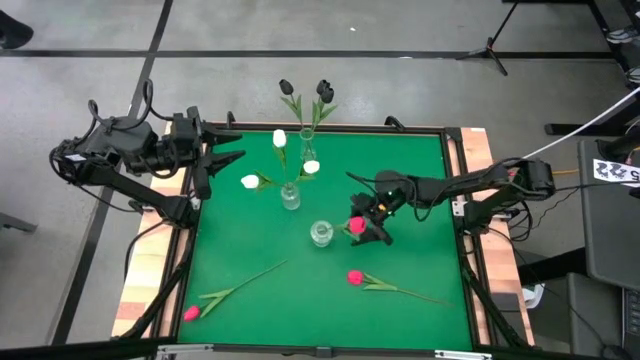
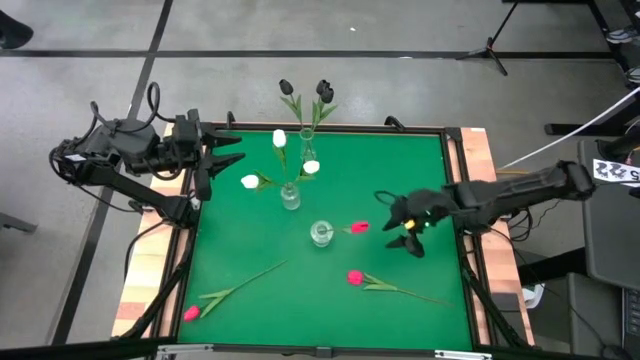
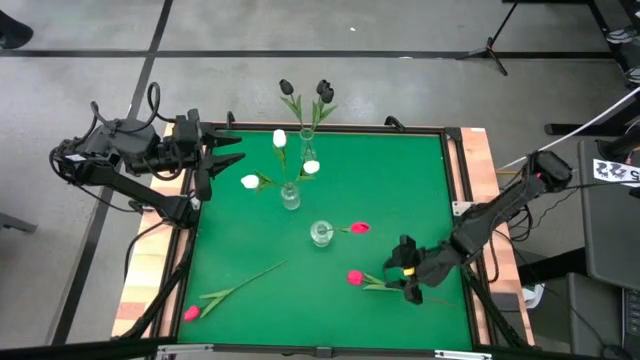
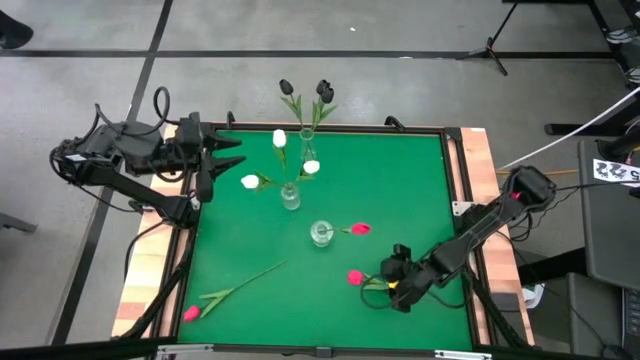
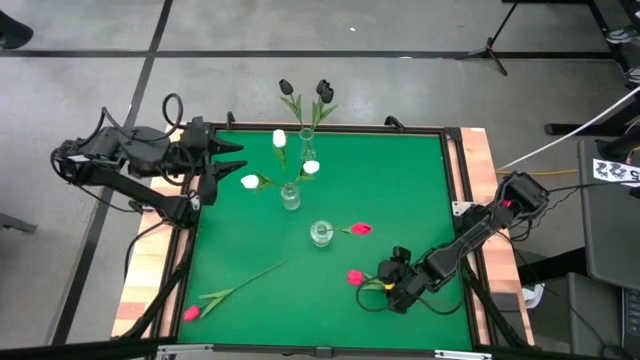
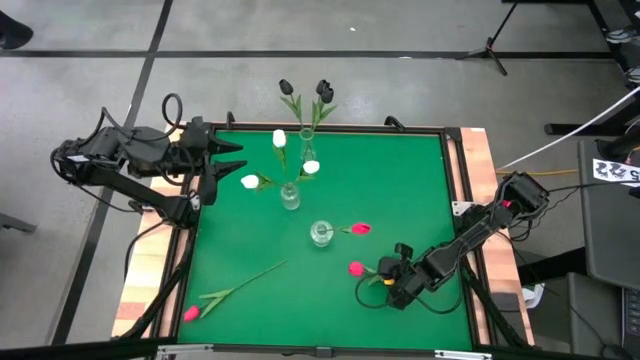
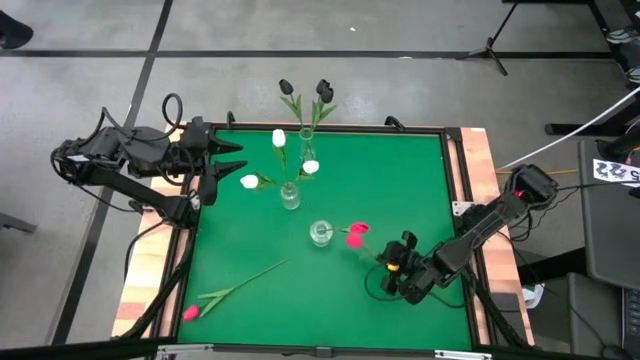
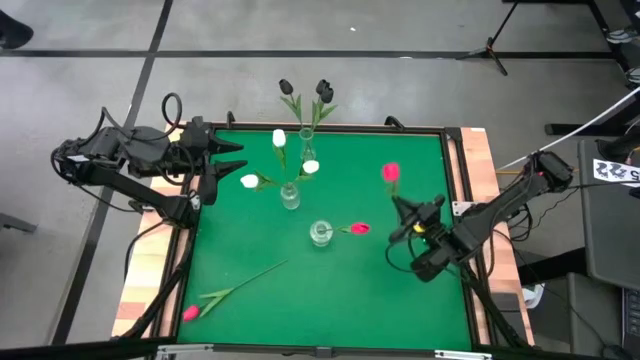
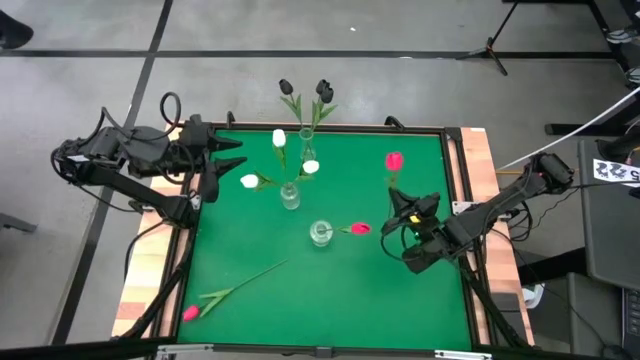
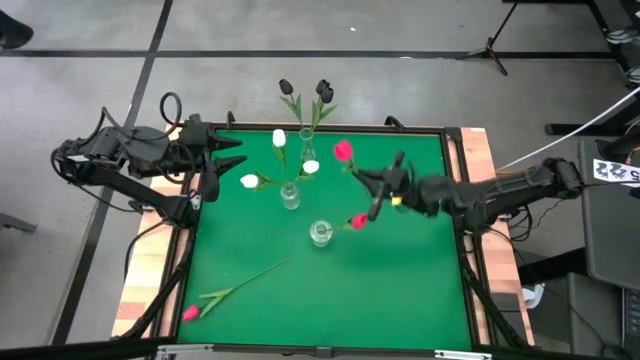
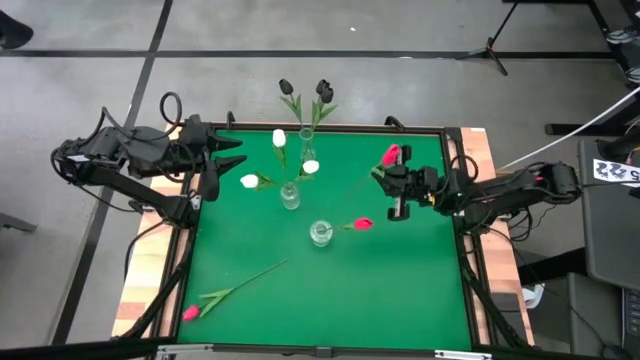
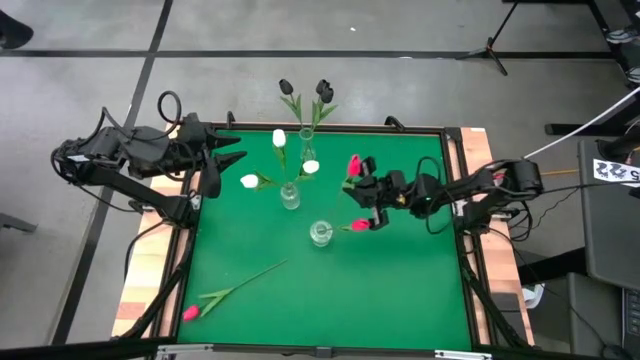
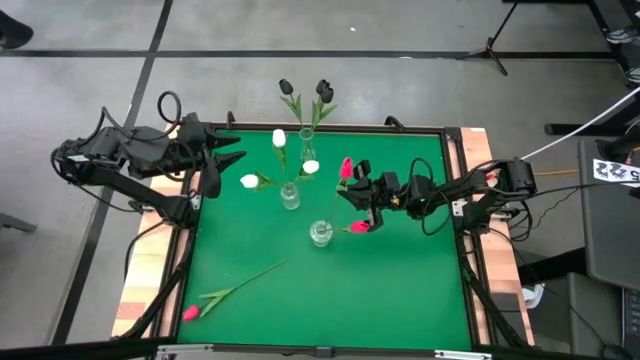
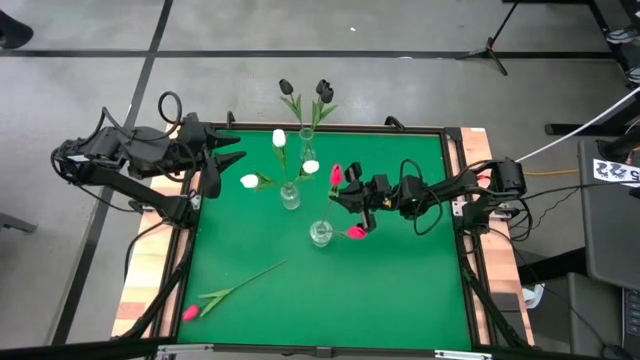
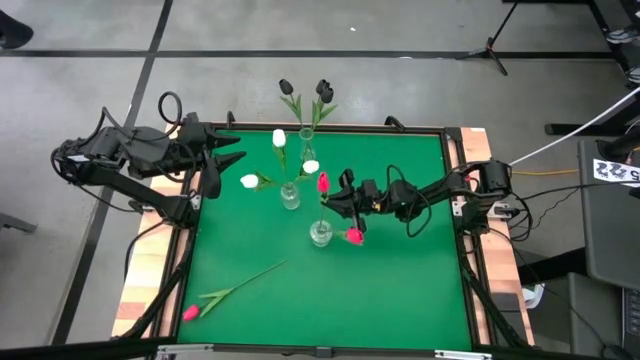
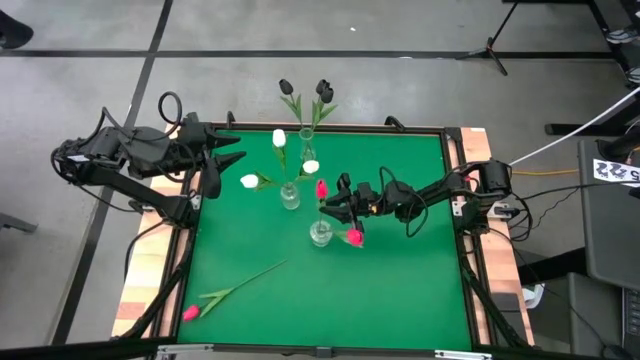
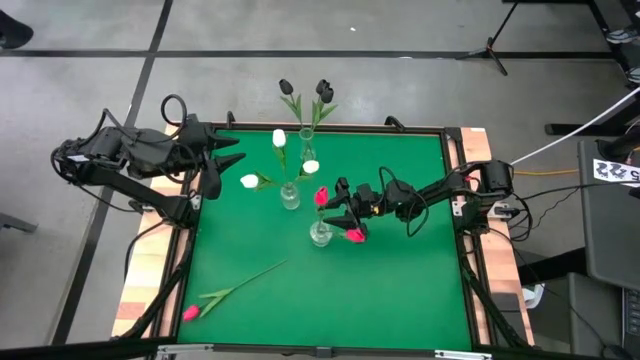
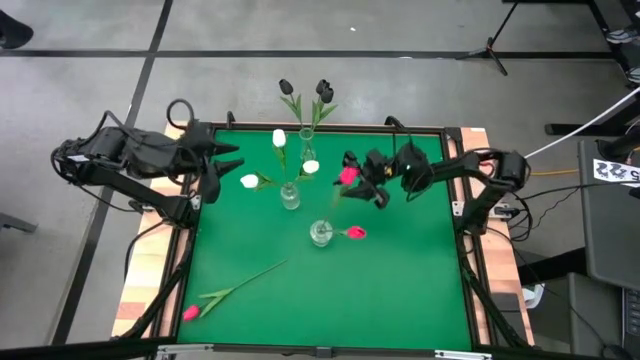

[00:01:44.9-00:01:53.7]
Task: Sort flowers into vase by color
Put the right pink flower into the bottom transparent vase

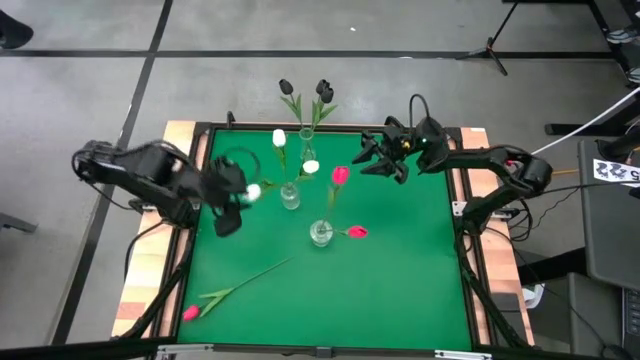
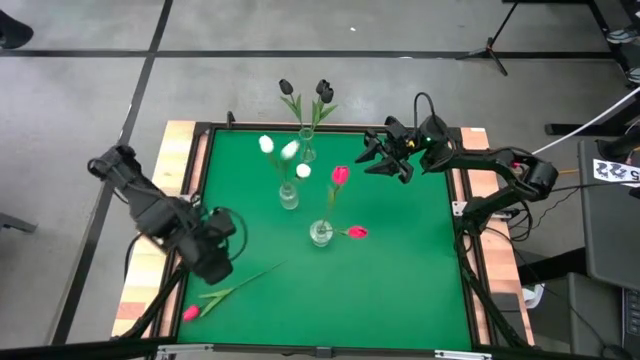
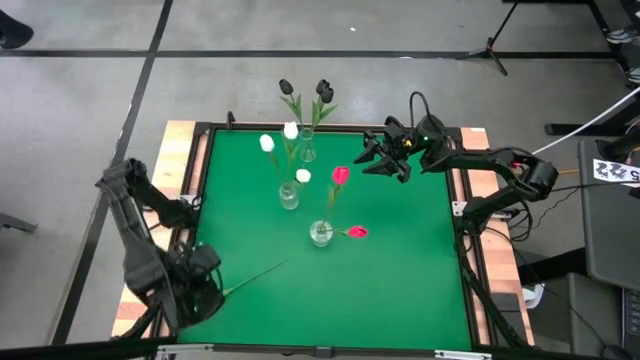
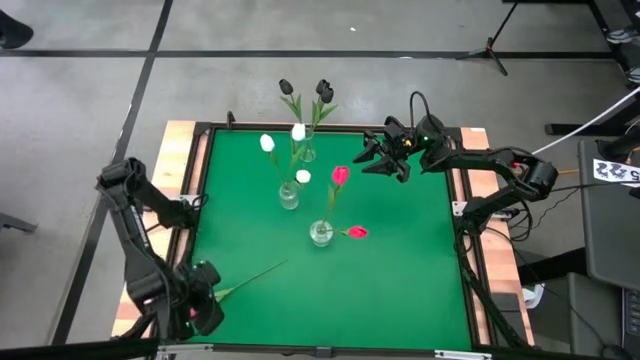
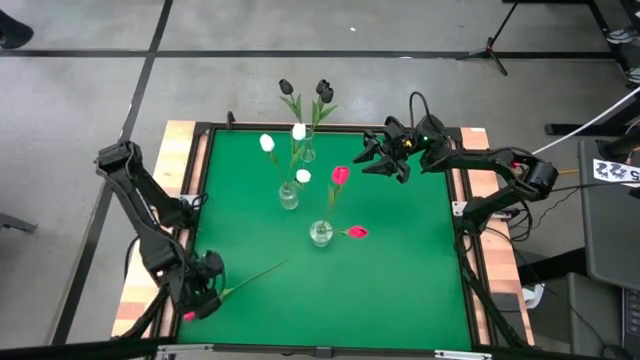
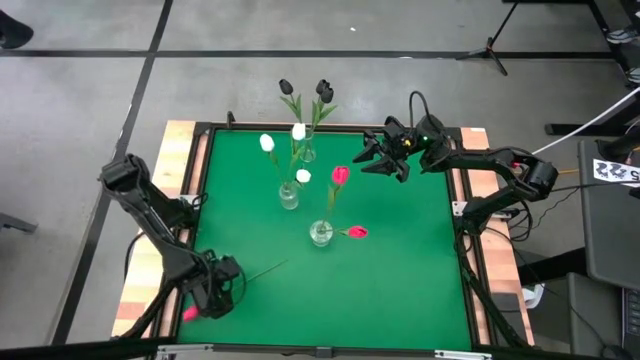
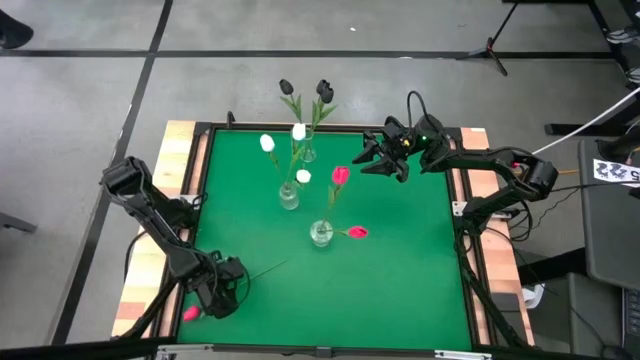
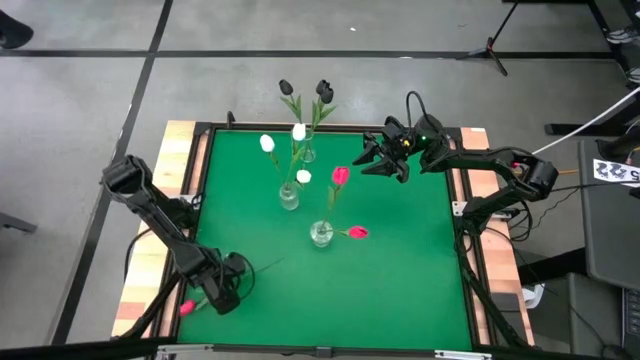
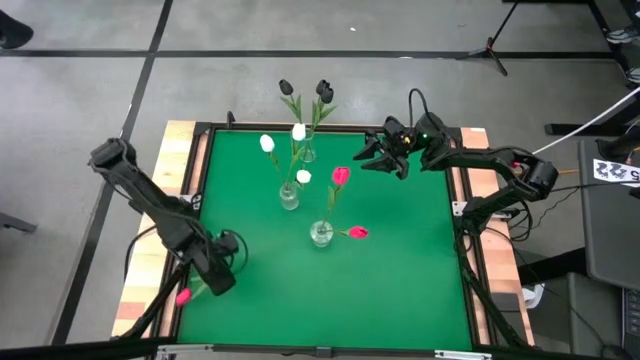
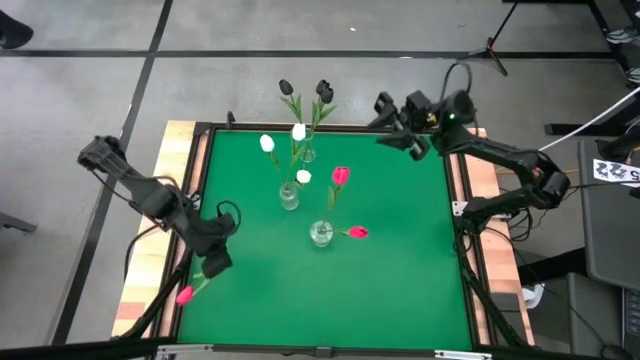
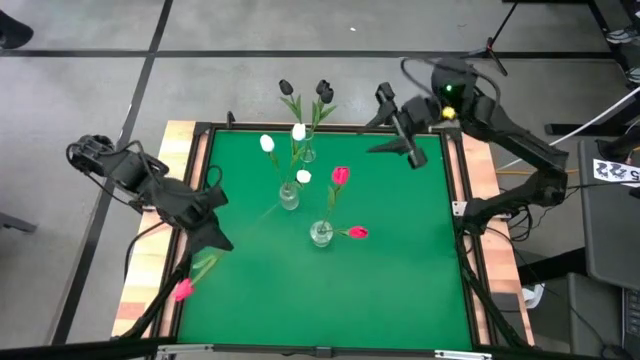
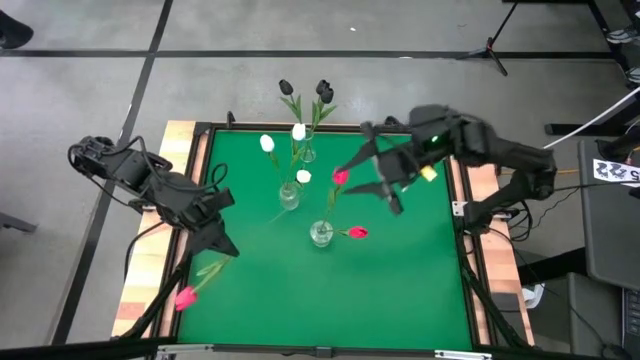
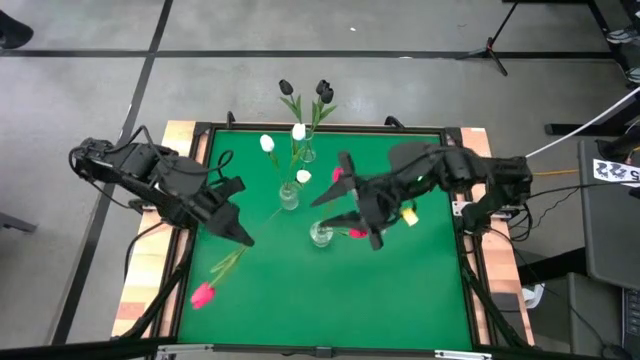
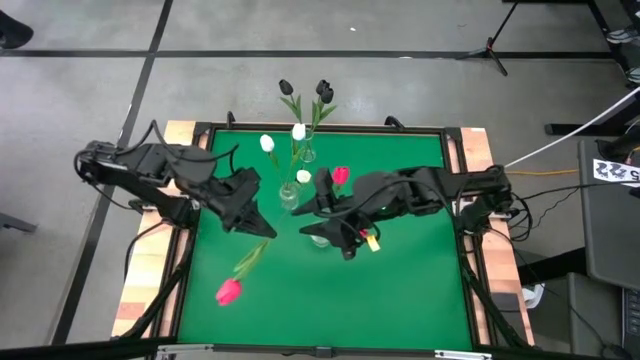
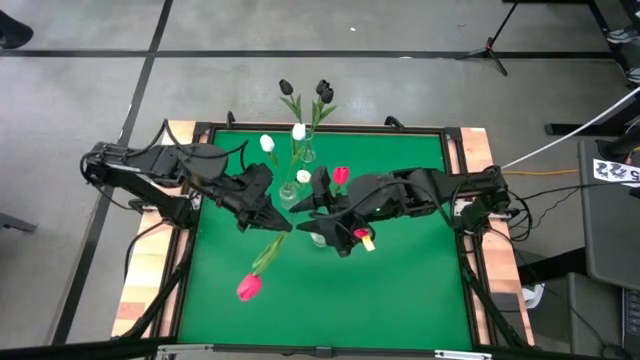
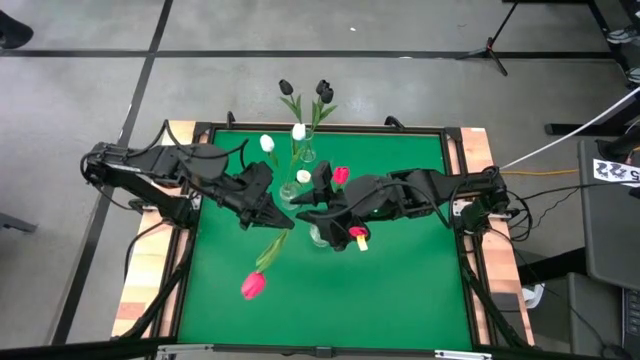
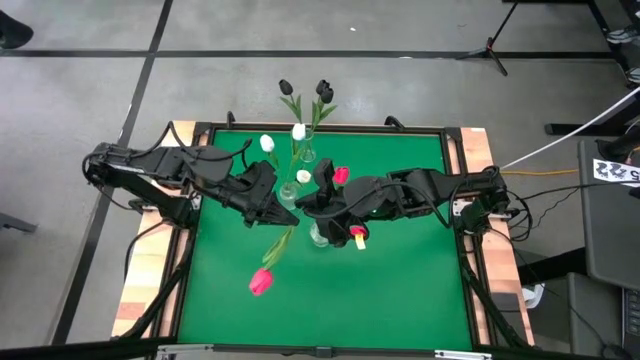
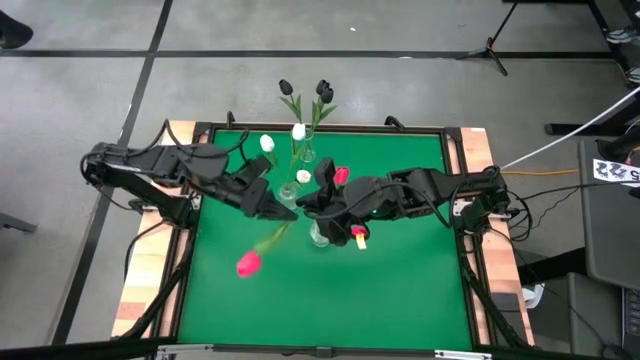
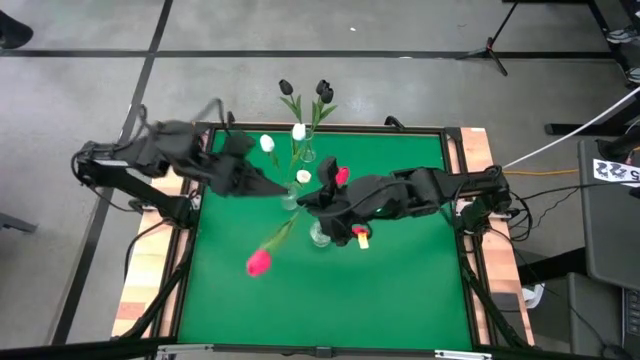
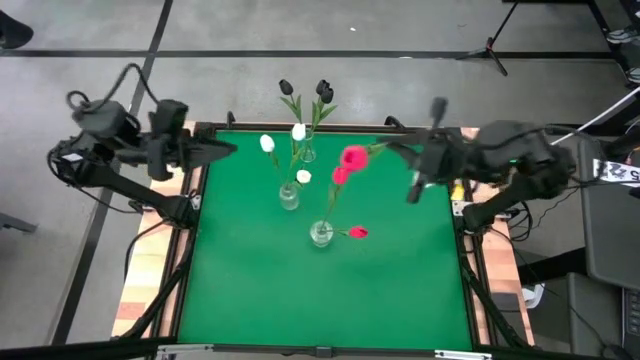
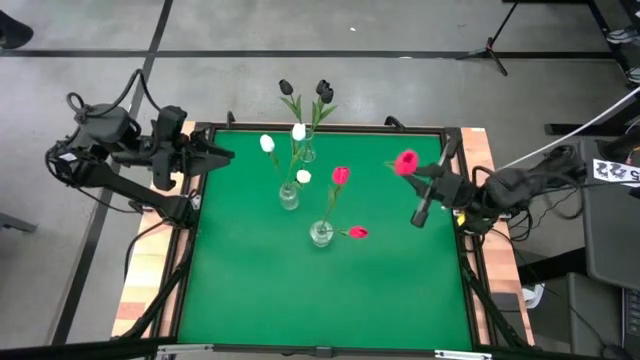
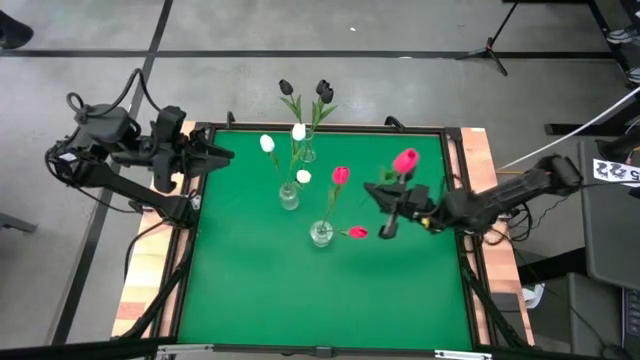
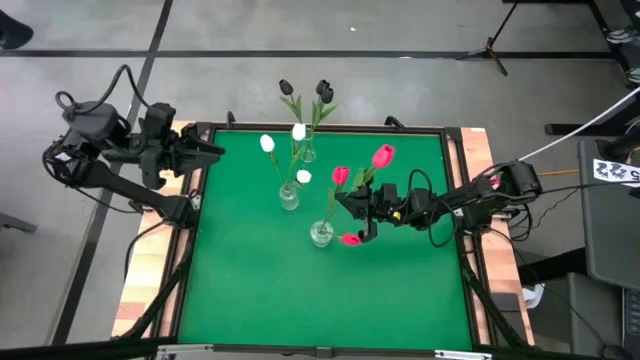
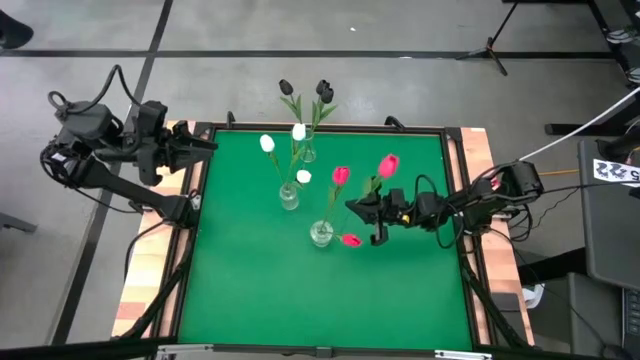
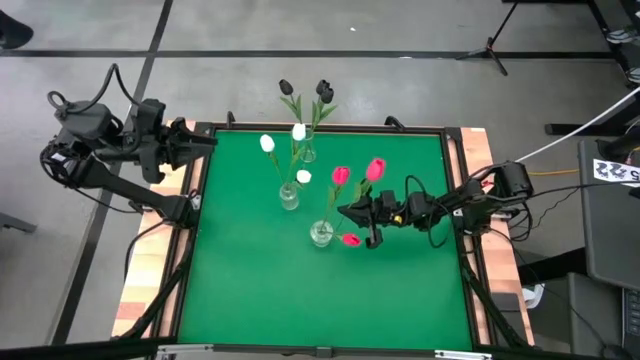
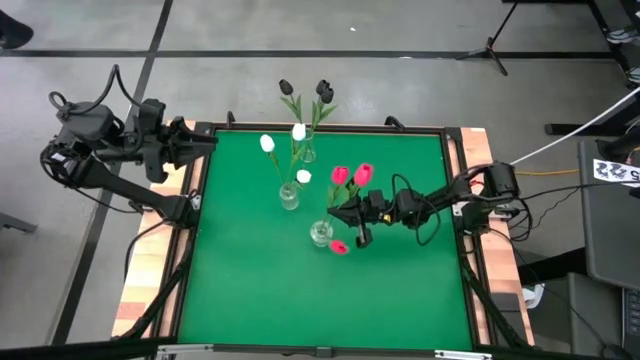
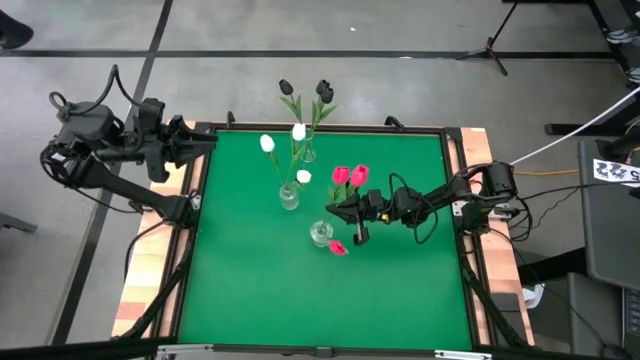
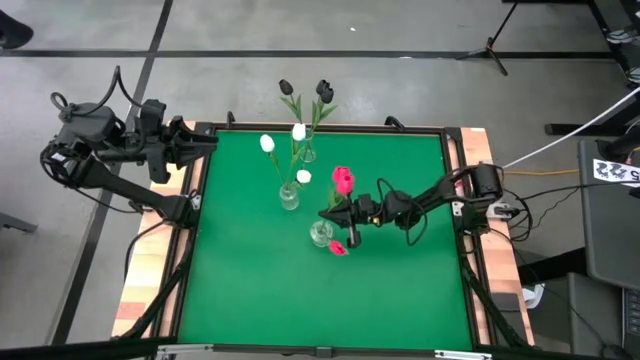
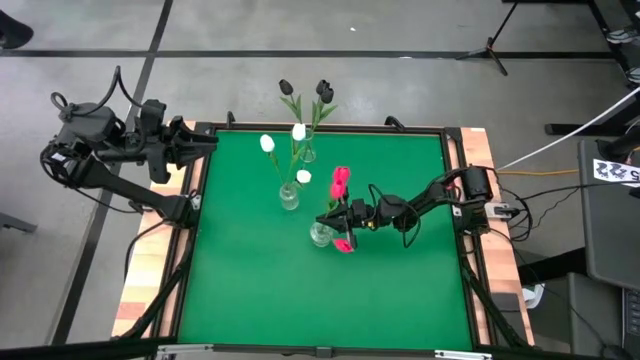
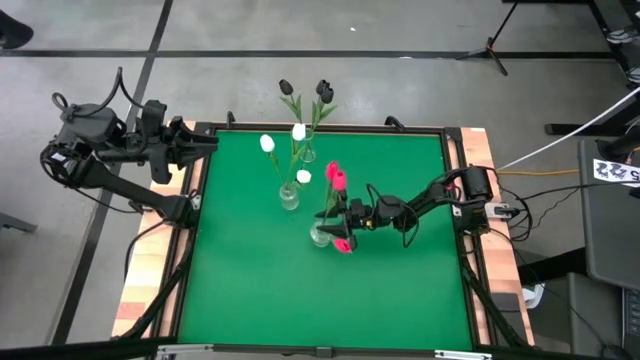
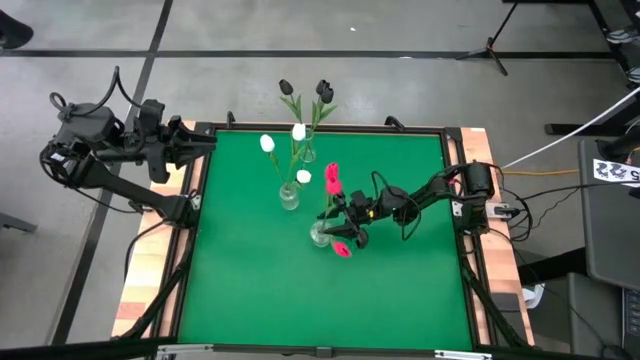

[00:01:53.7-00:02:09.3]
Put the pink flower into the bottom transparent vase
